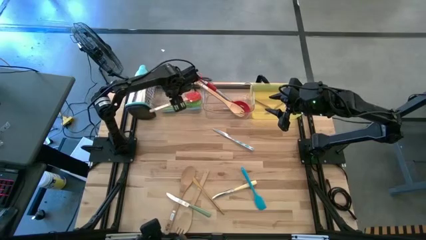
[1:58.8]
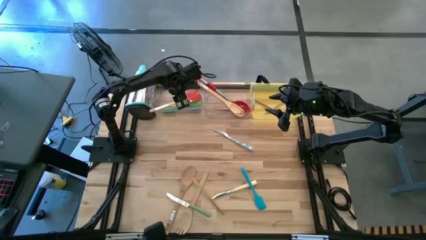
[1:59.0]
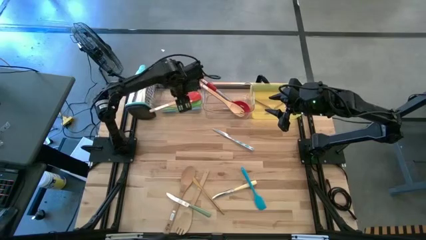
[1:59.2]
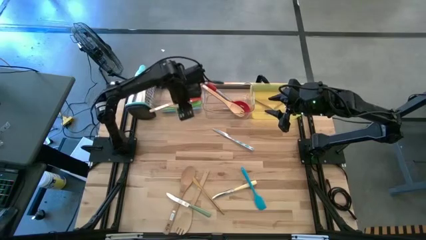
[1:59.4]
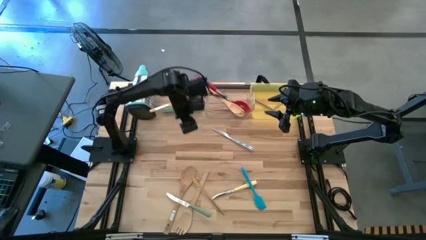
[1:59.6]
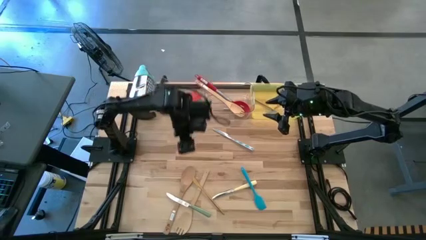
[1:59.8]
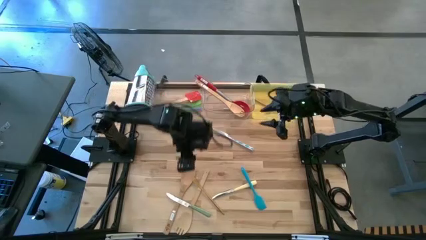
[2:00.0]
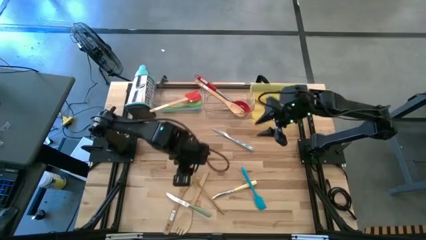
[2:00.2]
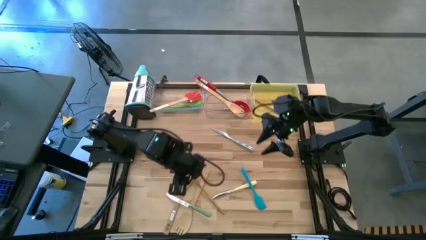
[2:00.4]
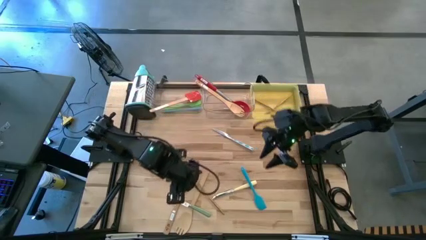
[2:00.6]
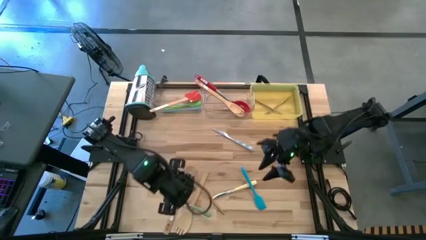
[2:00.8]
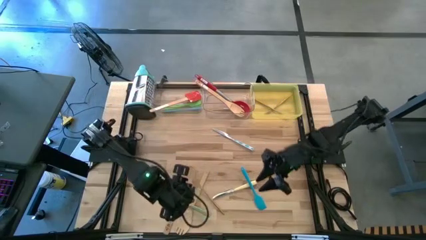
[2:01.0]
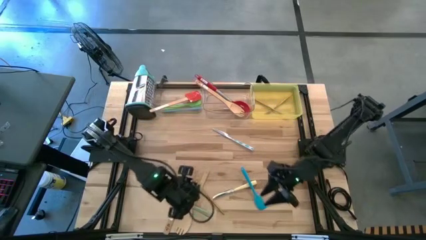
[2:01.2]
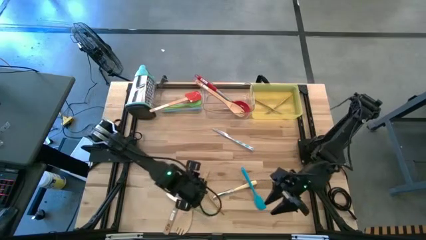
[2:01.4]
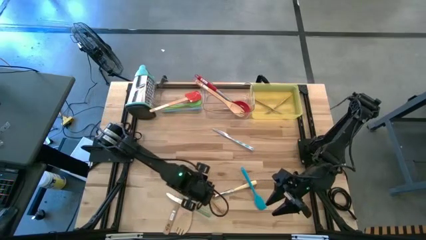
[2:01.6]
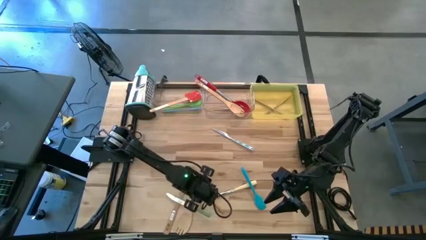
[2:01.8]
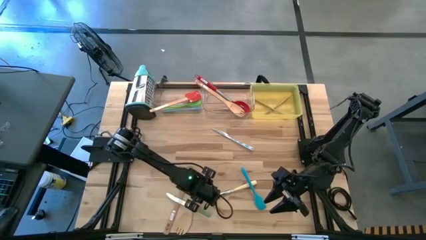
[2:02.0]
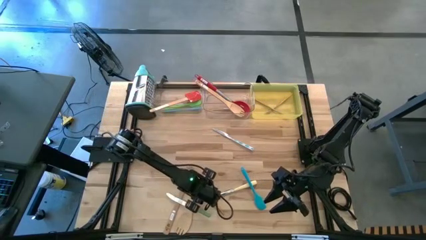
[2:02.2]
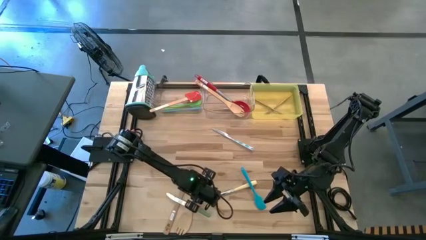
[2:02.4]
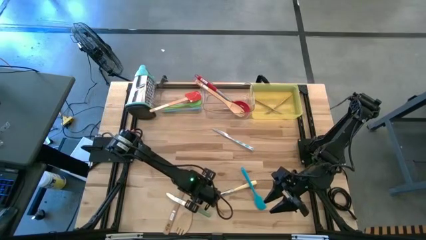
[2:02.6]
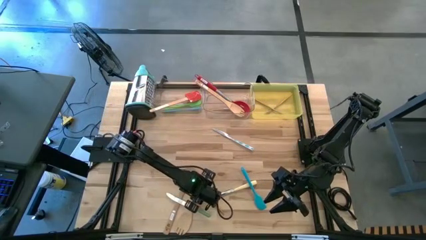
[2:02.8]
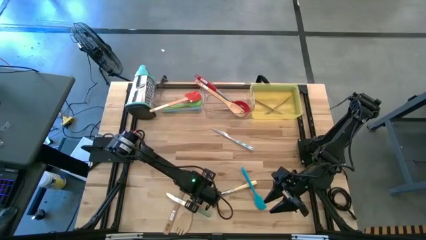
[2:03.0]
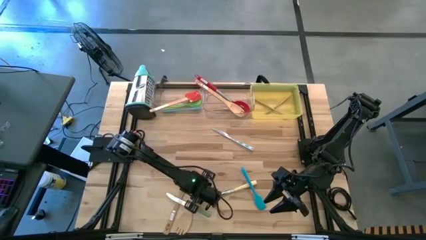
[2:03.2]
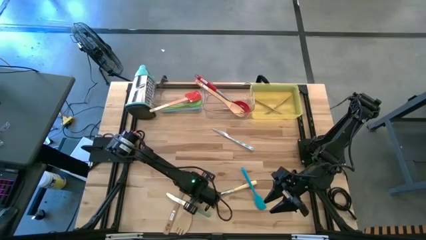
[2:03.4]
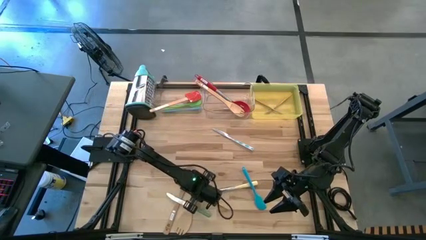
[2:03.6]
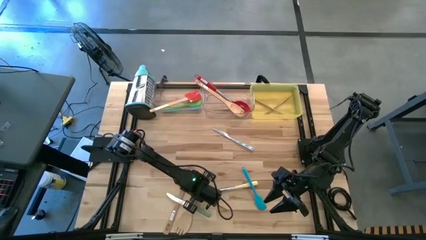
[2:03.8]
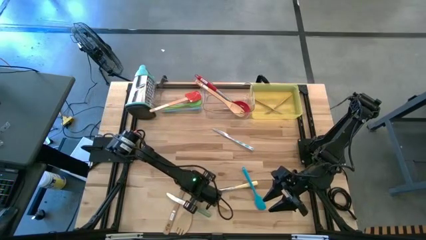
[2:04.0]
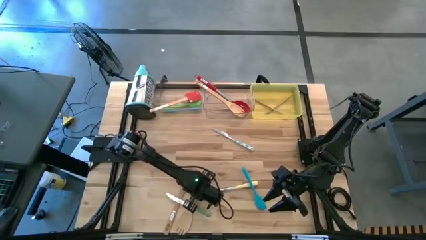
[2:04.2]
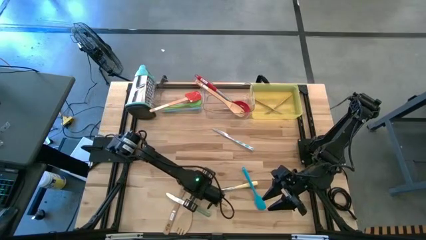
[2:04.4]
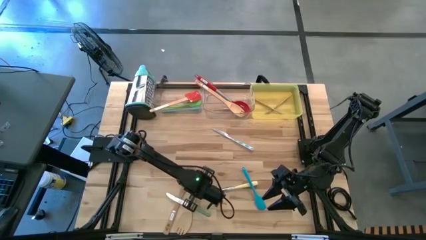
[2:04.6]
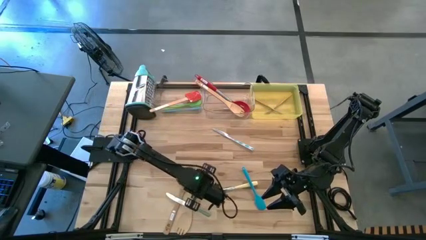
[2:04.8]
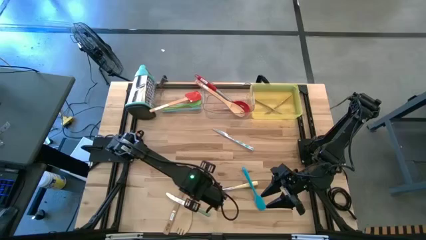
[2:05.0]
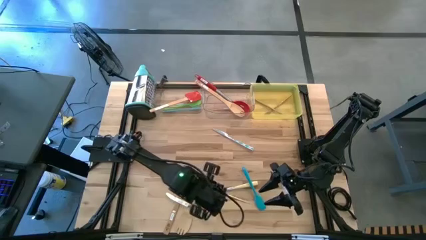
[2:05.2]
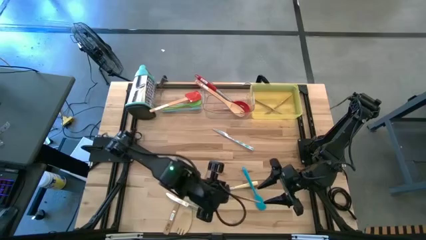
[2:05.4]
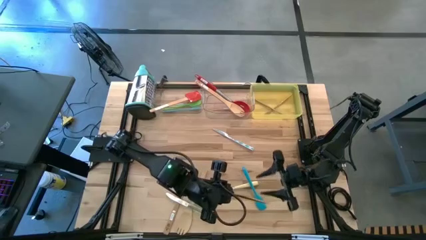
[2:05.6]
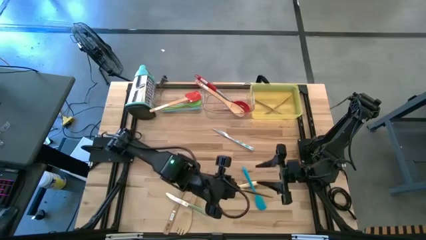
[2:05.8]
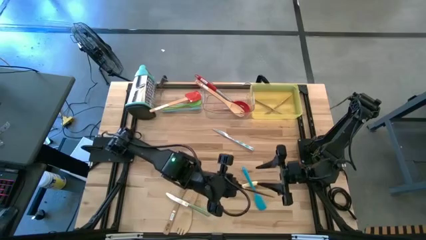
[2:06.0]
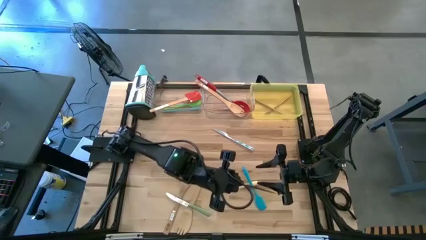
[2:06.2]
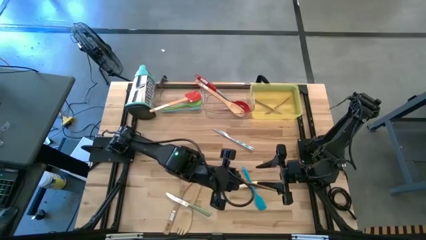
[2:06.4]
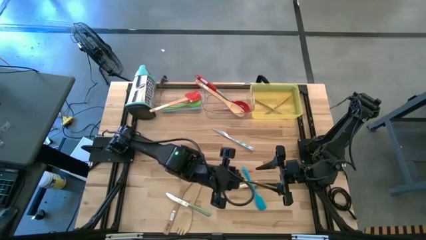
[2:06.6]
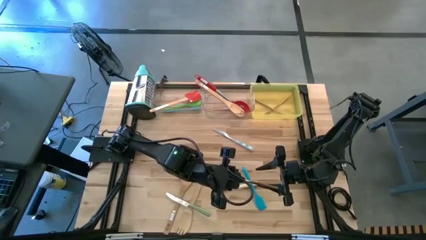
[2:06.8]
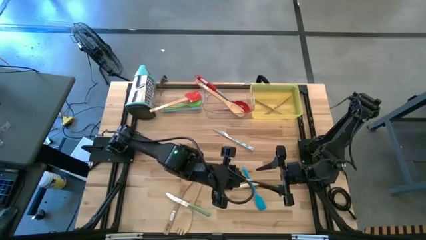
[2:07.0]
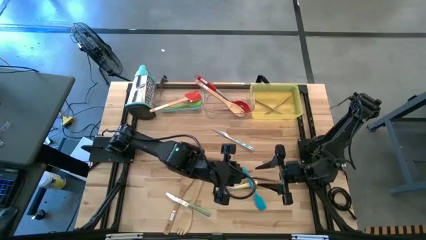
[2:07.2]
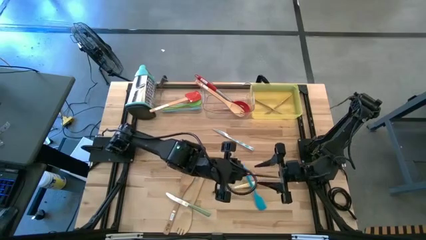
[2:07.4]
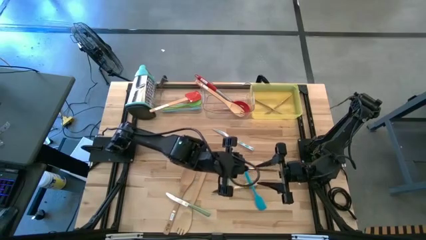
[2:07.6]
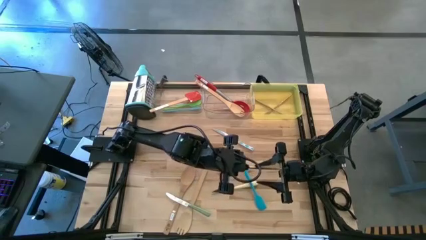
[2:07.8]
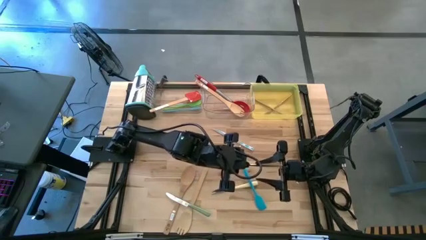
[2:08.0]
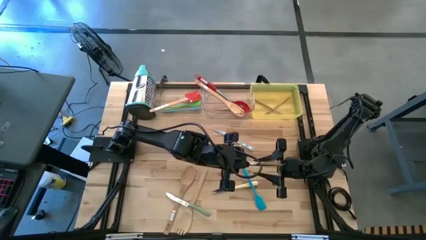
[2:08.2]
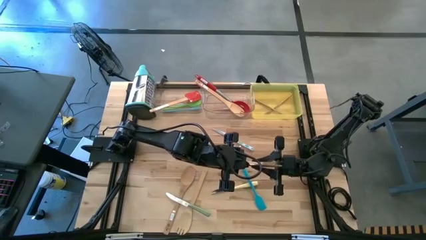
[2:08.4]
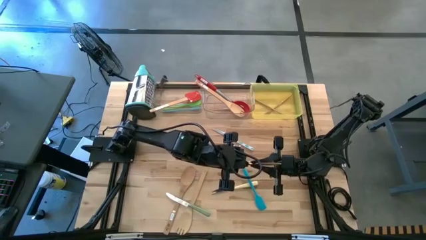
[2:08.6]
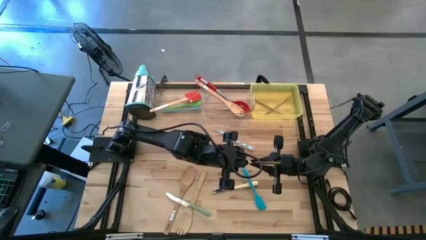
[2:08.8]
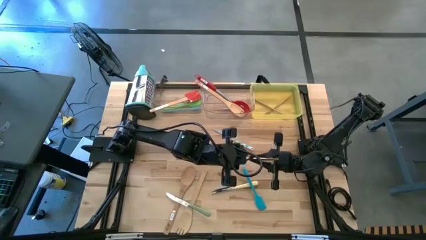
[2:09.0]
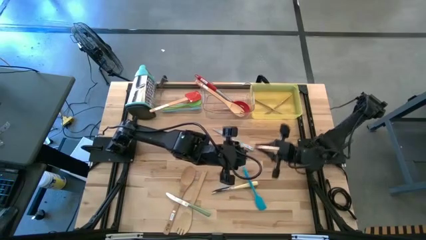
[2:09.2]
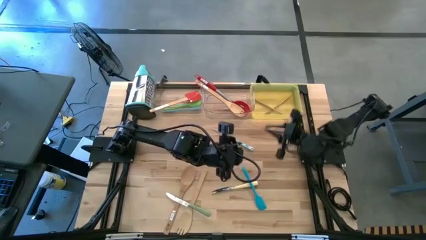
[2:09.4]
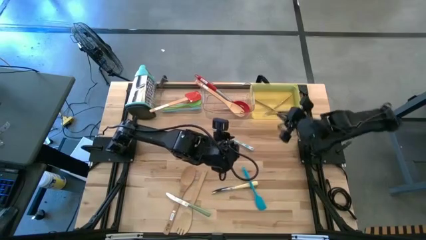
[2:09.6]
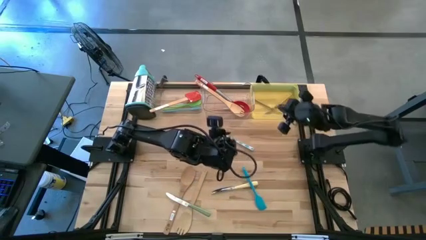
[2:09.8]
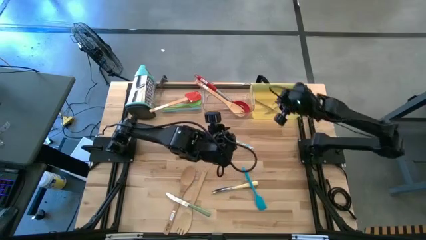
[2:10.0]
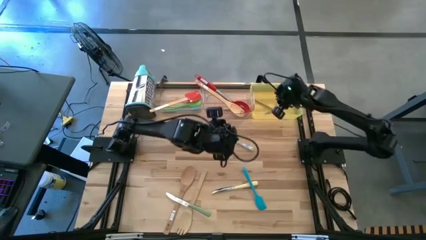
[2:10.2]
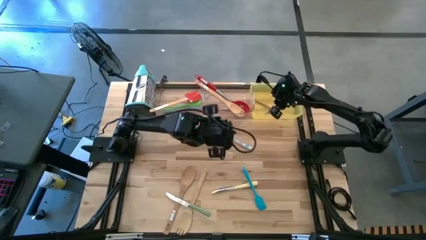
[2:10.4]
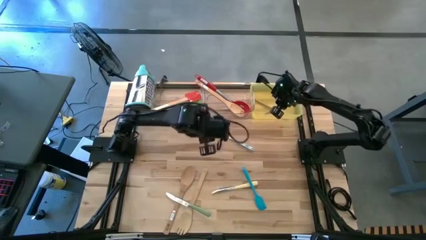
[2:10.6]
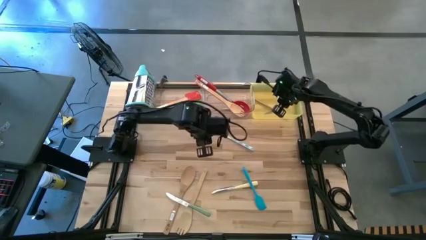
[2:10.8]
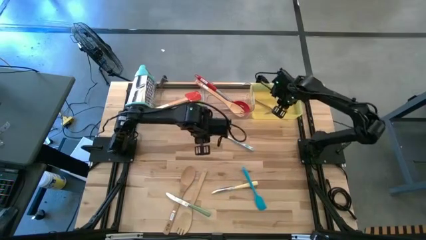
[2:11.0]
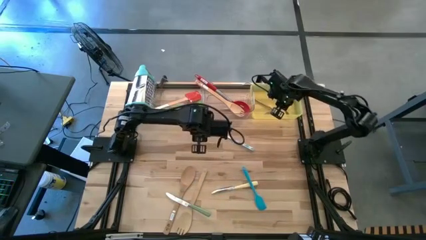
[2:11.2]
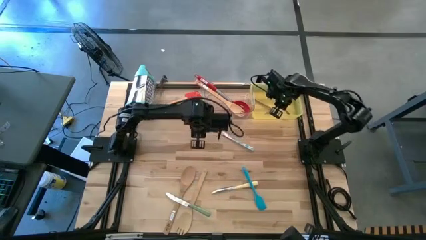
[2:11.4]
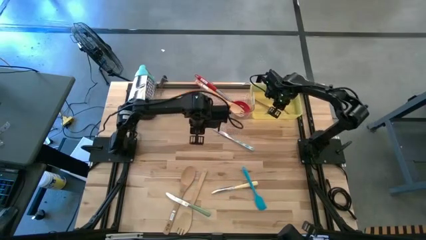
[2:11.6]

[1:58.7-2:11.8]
Task: Pick & Place Kitchen Items
Put the gold knife into the yellow bin

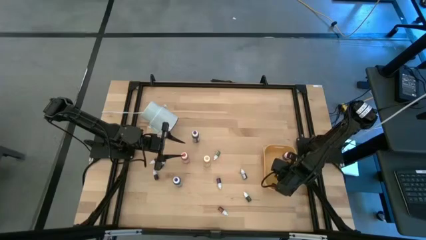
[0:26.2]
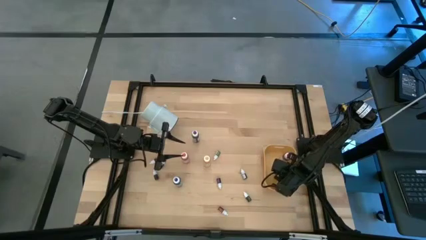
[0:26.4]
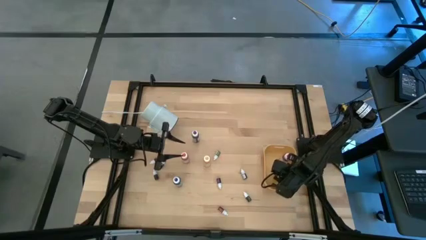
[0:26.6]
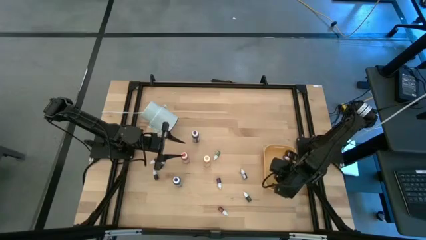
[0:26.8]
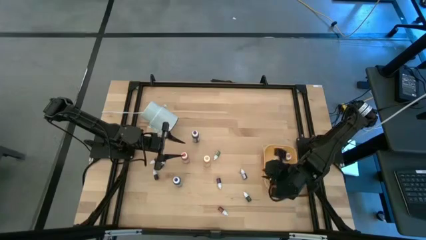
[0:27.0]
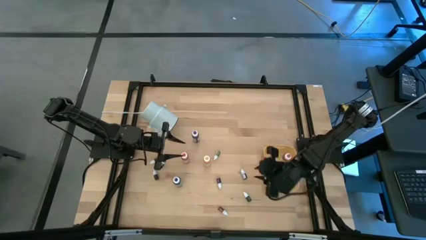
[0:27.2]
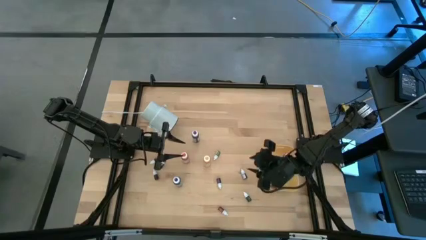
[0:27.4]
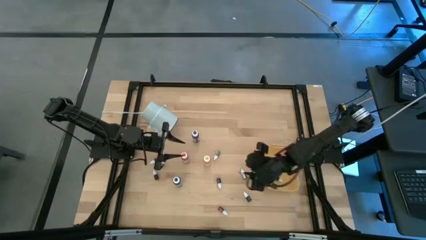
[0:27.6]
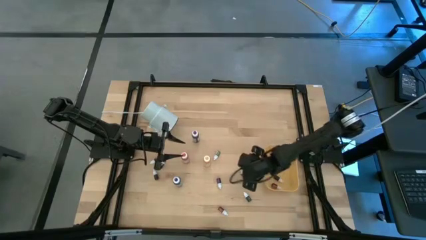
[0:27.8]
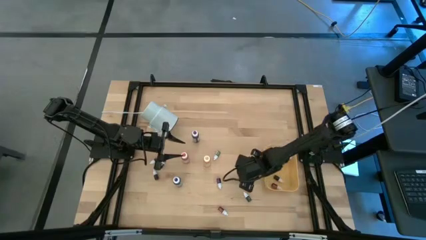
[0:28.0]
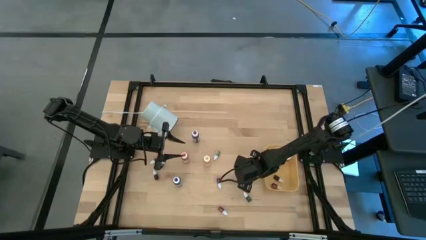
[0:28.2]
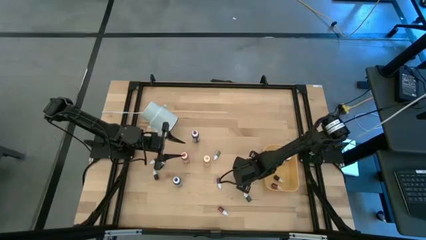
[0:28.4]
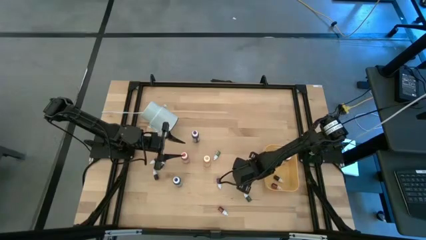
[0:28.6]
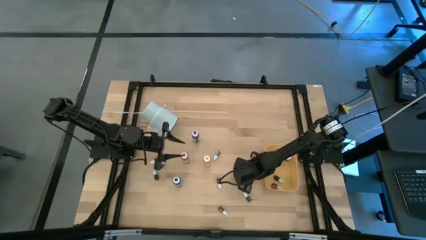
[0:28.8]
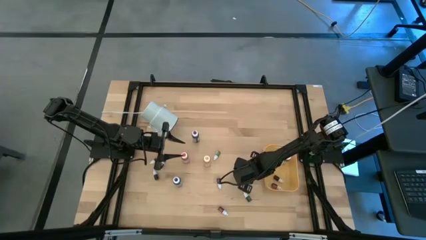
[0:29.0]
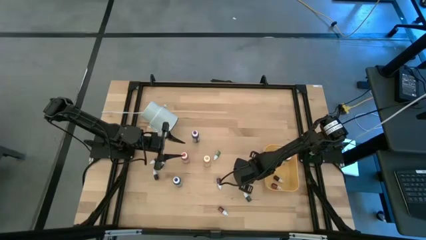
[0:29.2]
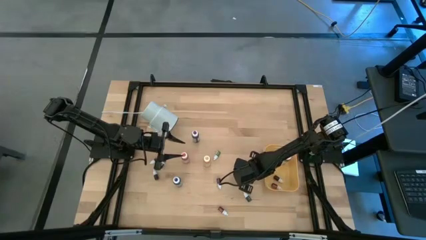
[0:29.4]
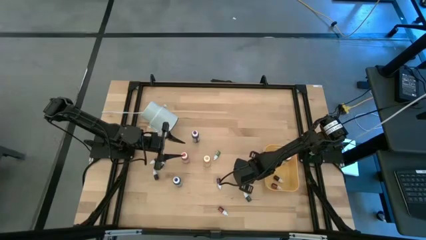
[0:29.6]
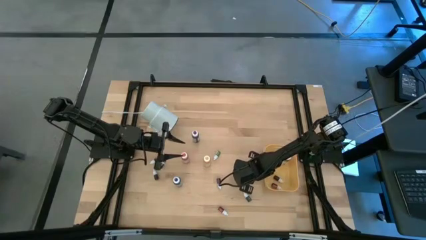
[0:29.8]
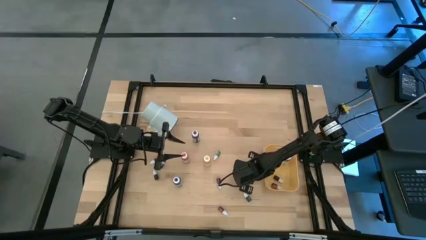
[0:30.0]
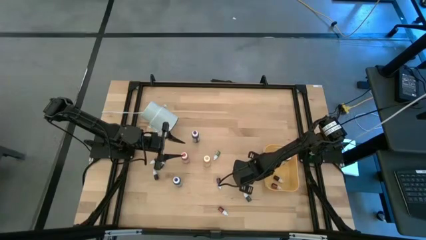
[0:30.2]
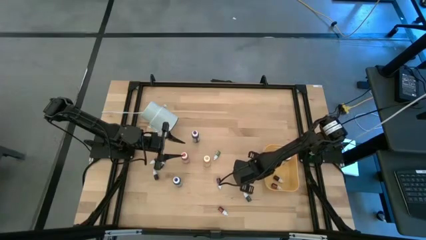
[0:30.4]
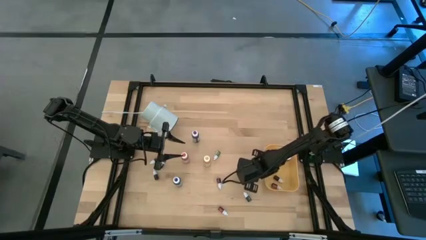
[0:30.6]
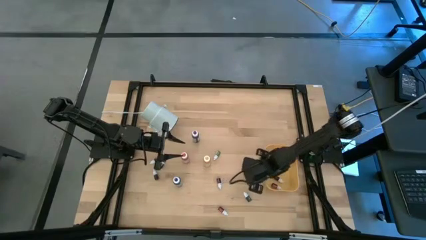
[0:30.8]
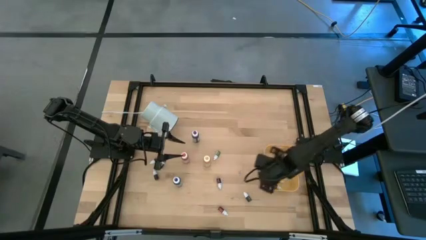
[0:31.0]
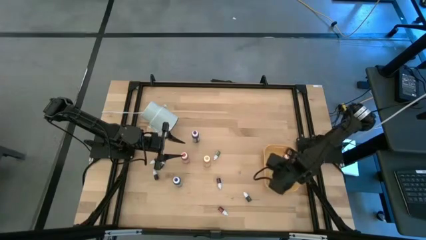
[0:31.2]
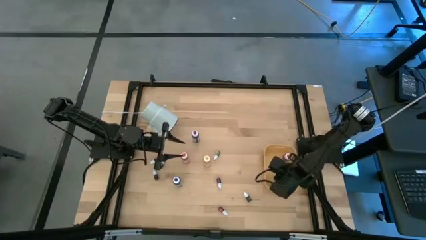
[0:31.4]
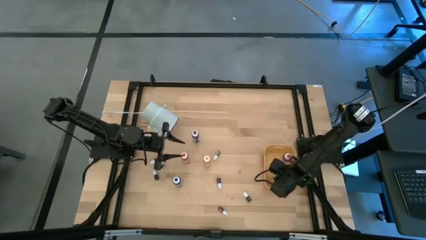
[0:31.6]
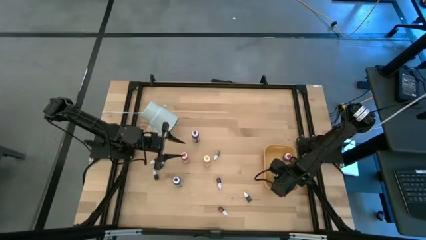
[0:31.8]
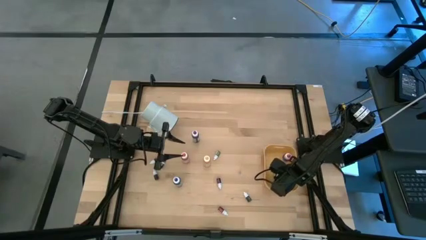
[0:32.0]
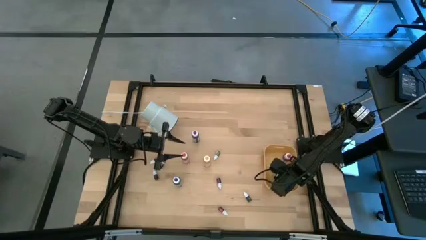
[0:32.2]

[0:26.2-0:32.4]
Task: Pick & Place food coloring
Put the small blue food coloring bottle into the yellow bin
